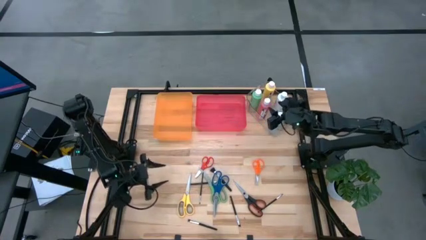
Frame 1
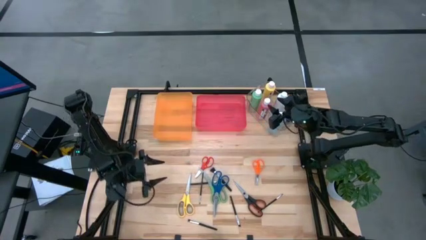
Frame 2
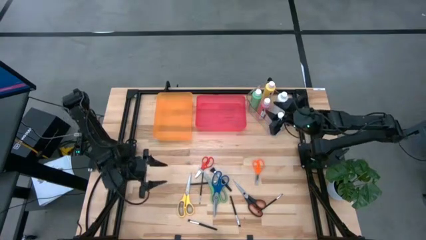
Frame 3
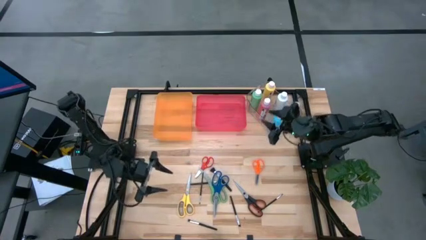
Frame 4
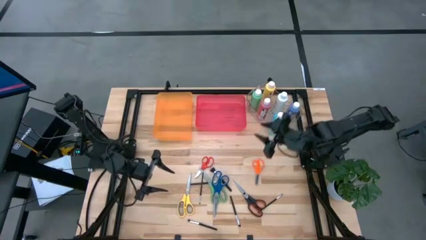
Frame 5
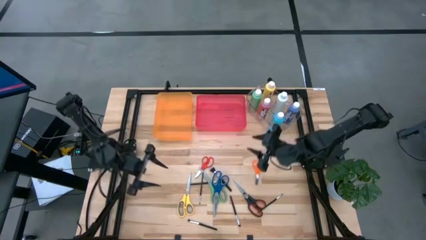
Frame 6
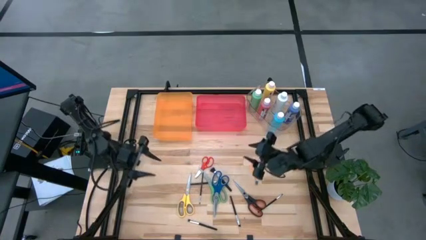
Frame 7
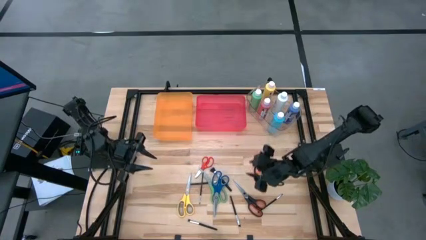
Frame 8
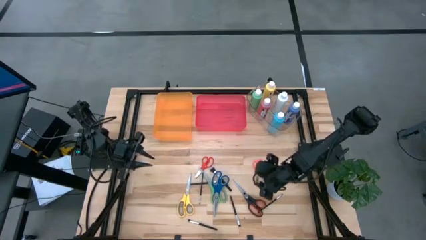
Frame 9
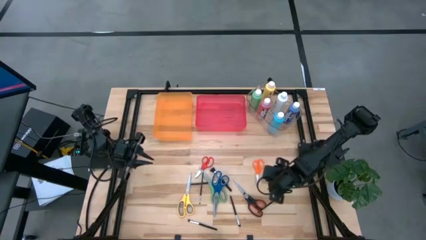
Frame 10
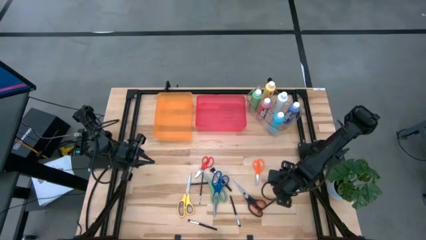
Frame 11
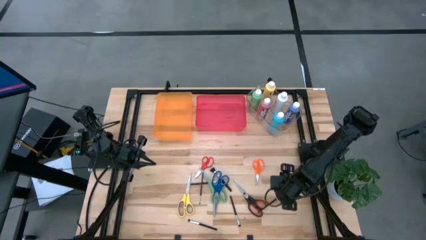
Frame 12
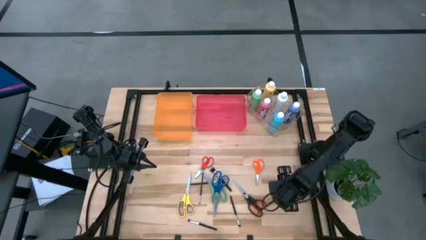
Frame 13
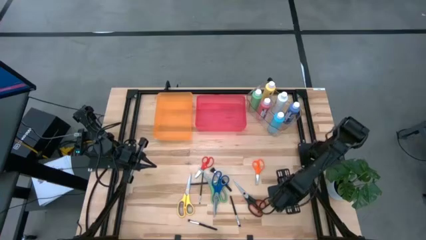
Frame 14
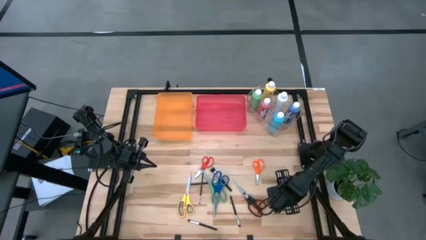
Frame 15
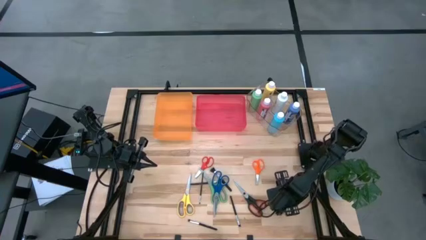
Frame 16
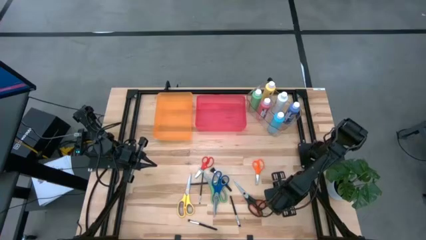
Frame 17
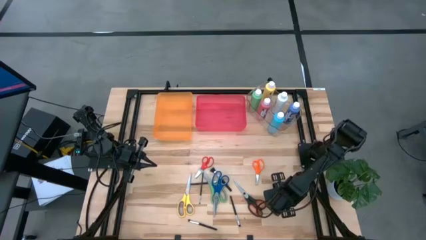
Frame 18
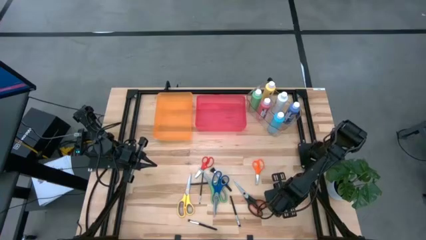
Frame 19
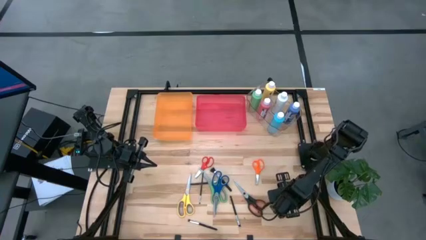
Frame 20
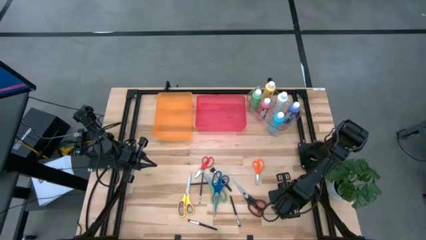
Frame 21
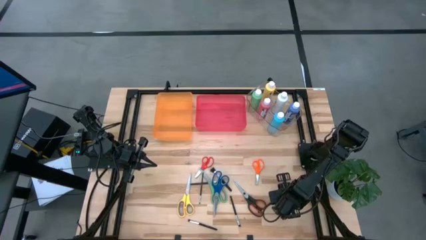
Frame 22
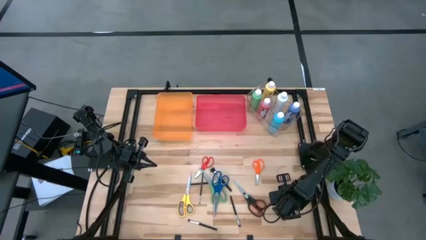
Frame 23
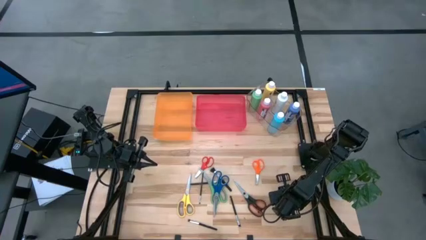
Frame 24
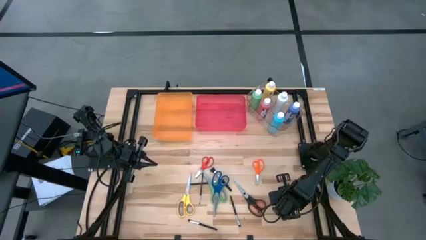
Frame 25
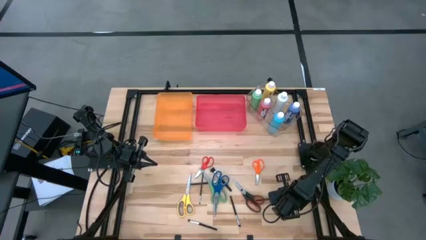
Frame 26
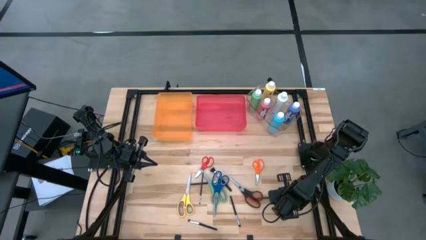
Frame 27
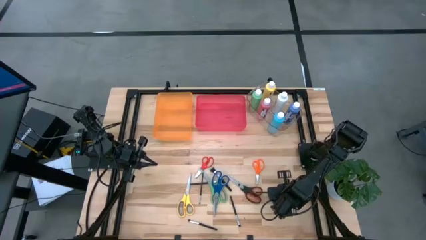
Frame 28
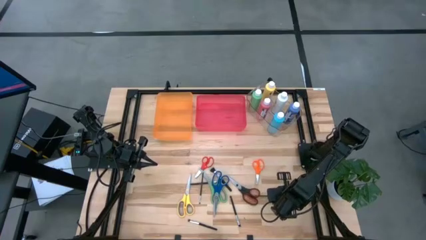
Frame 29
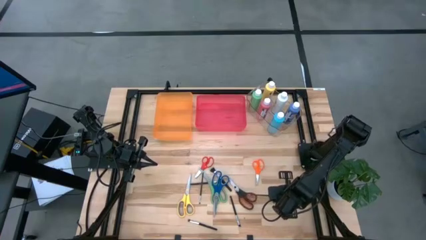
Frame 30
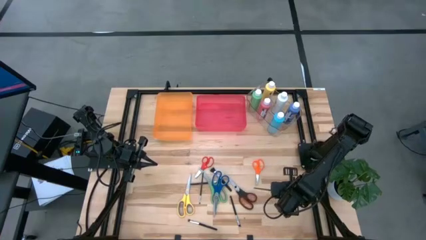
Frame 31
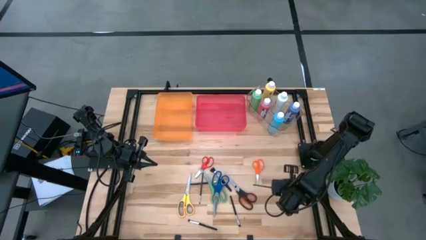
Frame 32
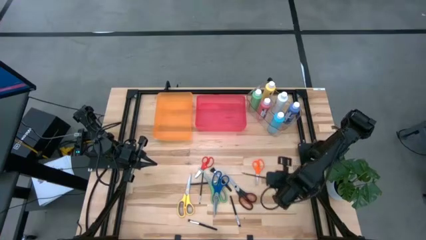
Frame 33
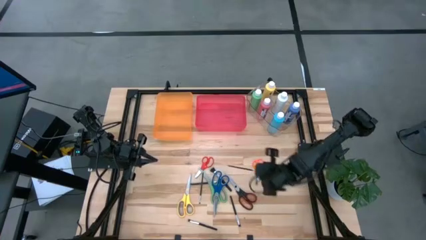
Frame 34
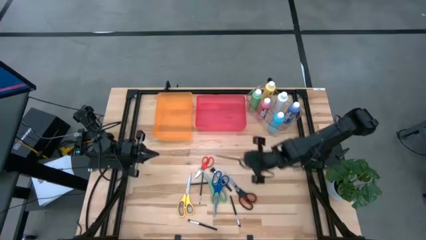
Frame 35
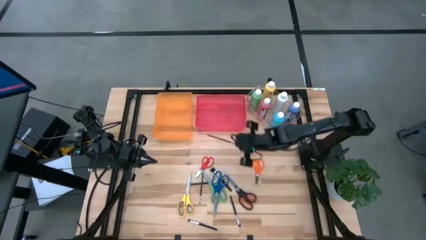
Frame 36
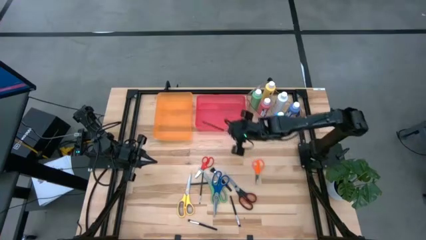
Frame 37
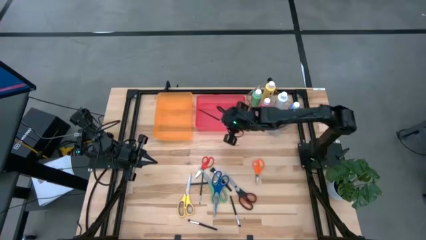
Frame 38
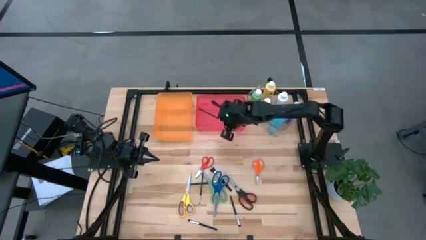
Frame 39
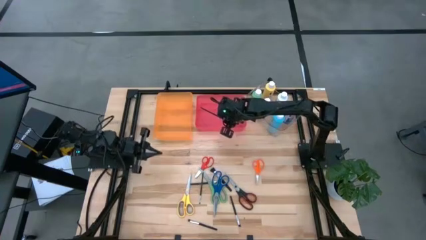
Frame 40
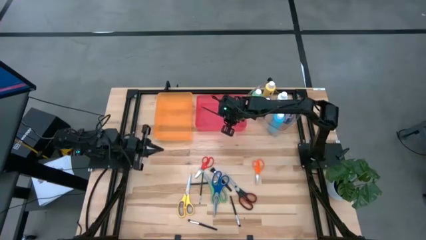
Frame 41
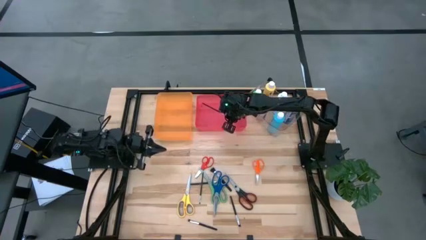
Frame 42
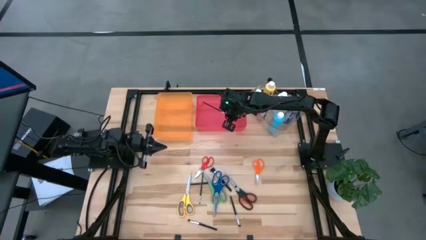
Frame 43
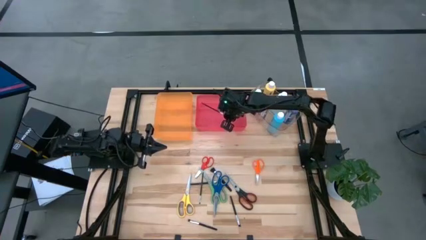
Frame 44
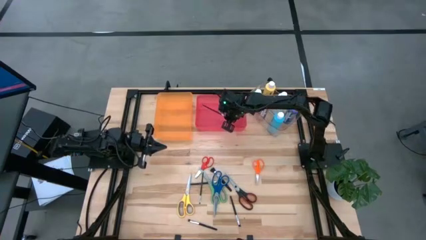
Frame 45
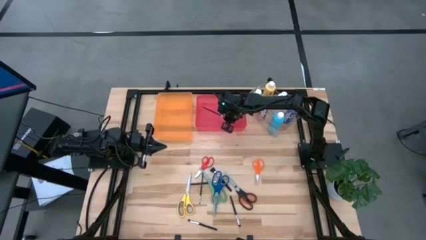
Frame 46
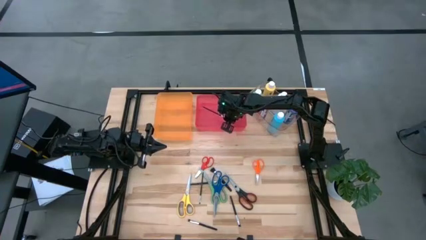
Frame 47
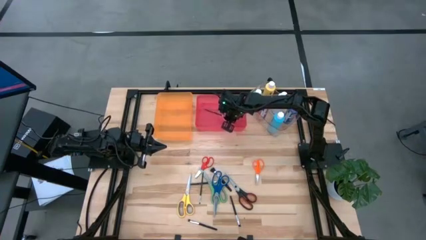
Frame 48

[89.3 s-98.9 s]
Task: Pick & Place Paint Supplies
Put the black paintbrush into the pink bin

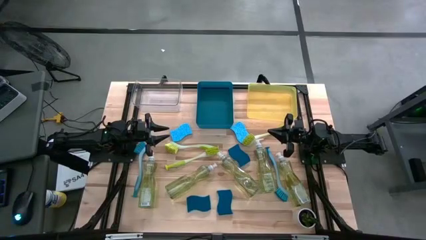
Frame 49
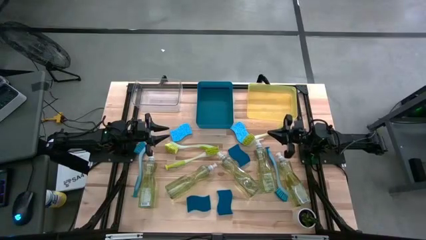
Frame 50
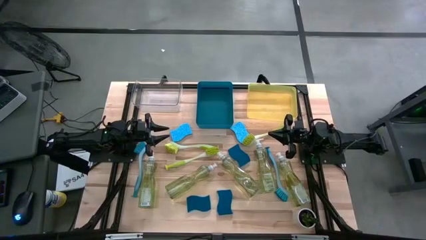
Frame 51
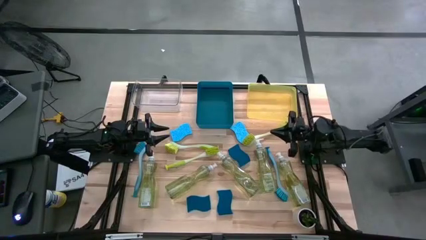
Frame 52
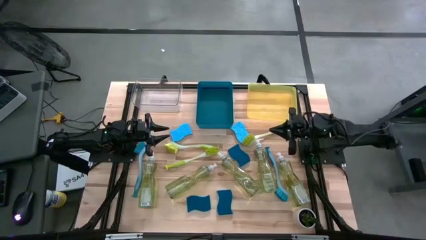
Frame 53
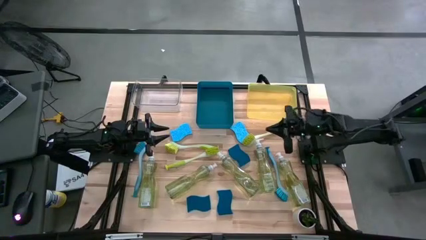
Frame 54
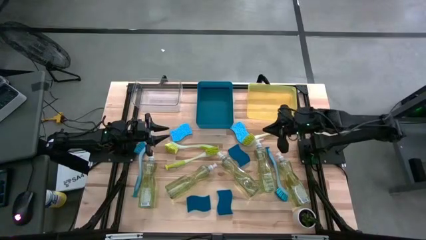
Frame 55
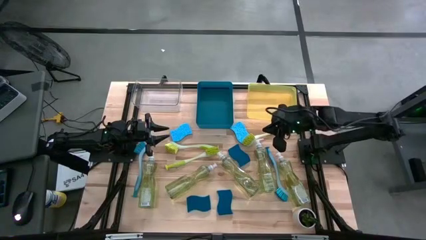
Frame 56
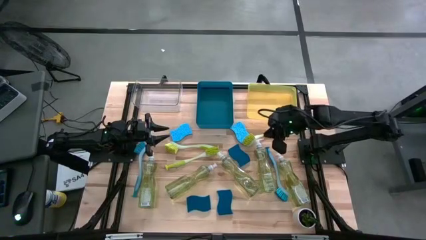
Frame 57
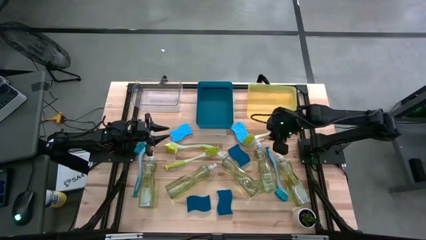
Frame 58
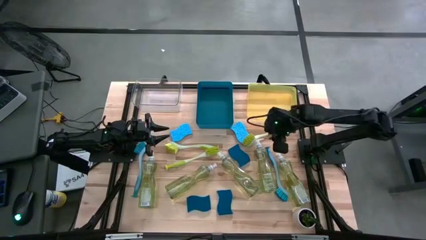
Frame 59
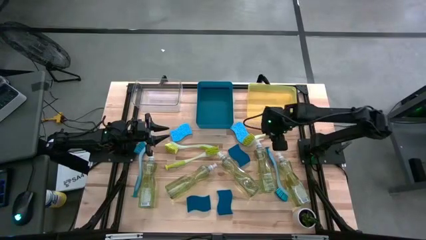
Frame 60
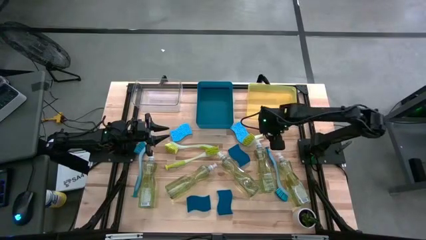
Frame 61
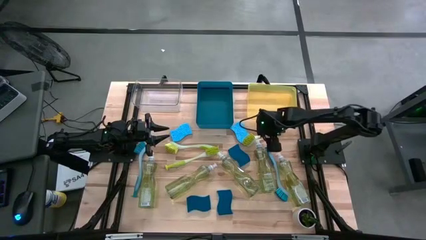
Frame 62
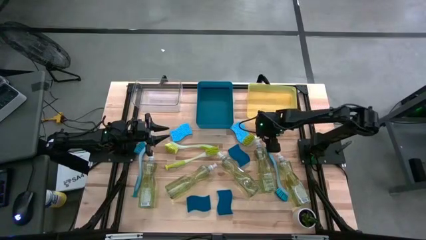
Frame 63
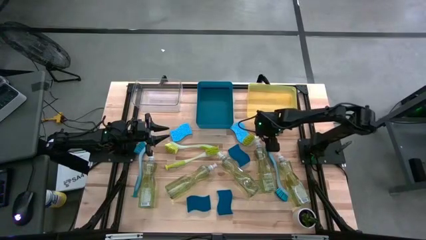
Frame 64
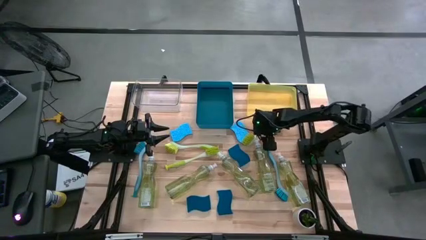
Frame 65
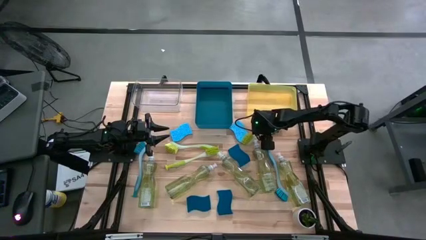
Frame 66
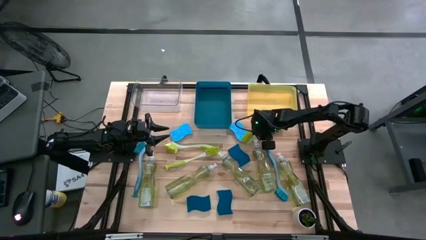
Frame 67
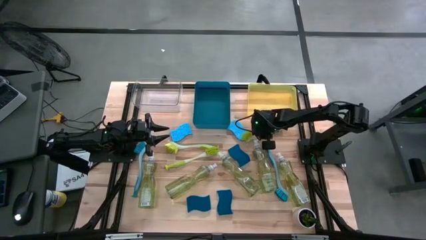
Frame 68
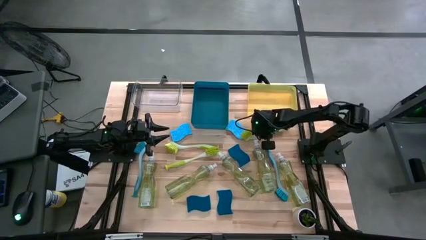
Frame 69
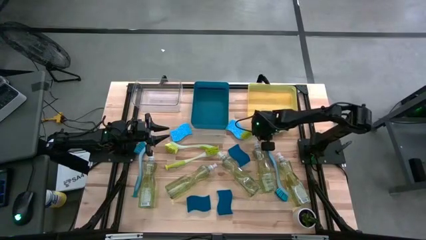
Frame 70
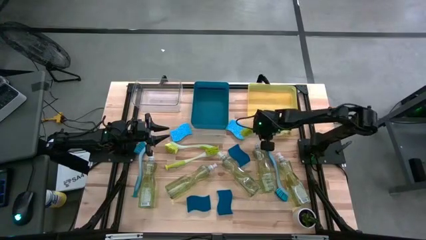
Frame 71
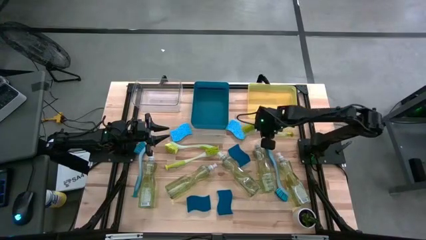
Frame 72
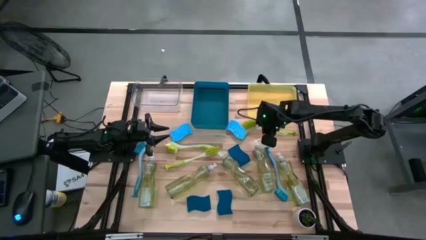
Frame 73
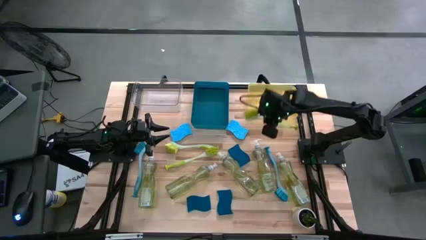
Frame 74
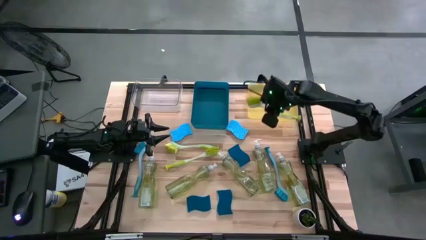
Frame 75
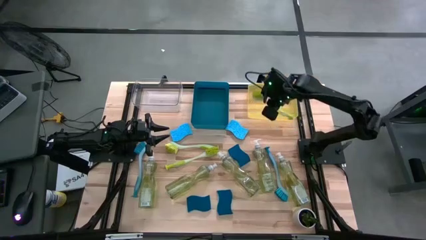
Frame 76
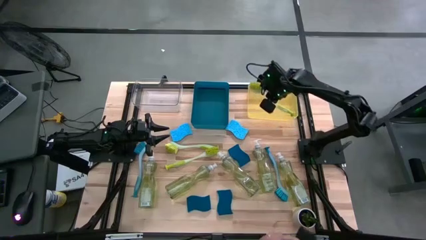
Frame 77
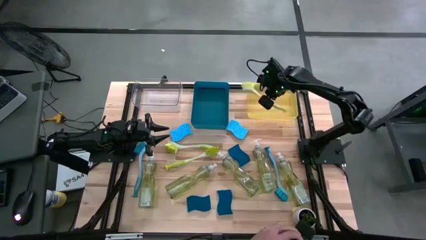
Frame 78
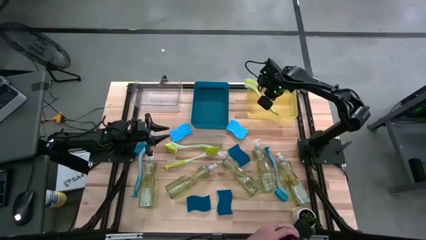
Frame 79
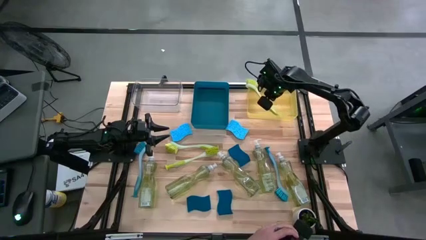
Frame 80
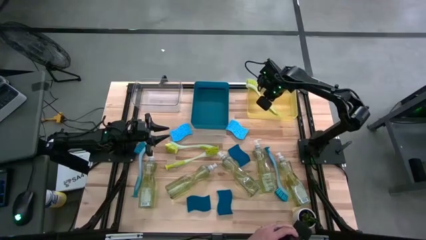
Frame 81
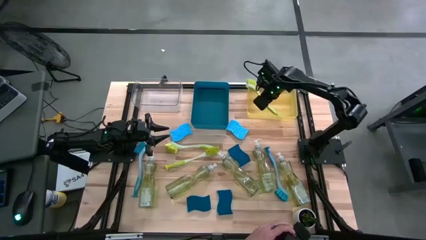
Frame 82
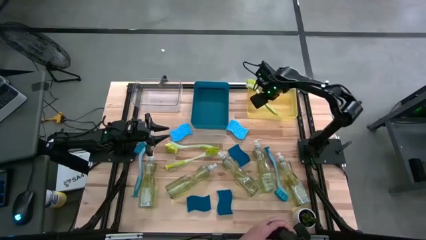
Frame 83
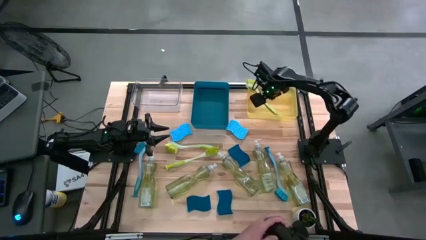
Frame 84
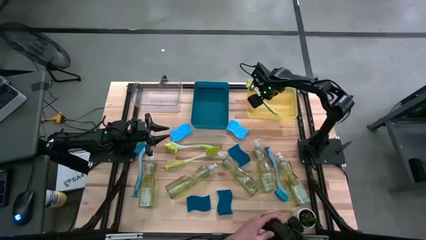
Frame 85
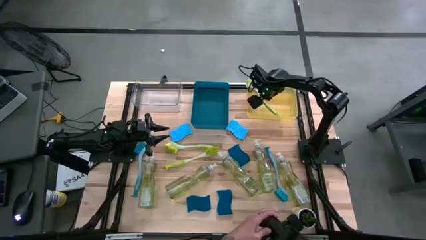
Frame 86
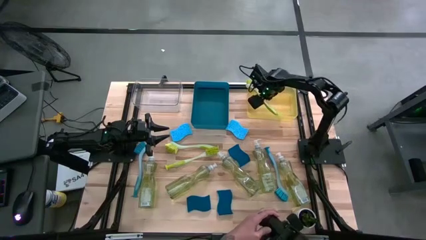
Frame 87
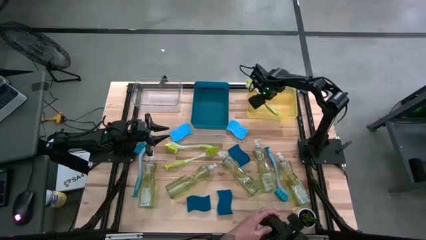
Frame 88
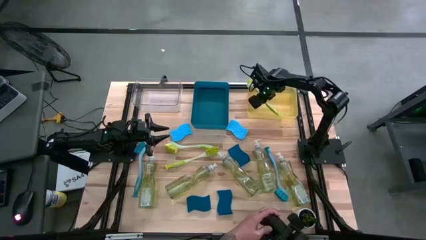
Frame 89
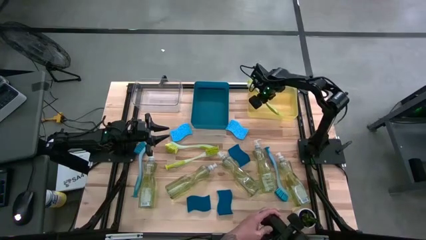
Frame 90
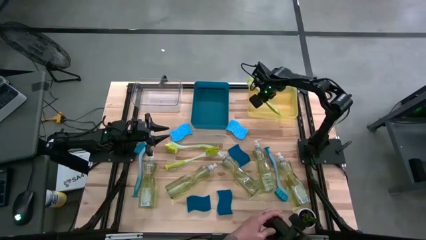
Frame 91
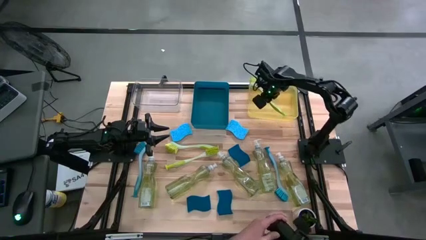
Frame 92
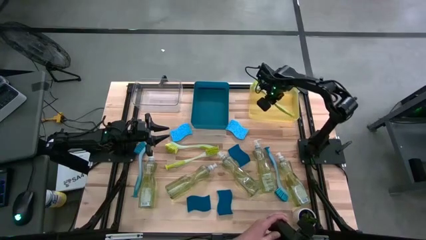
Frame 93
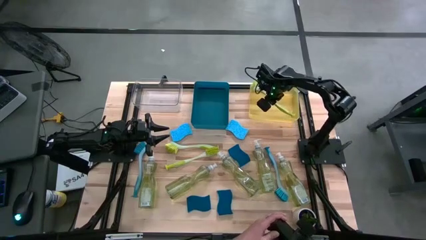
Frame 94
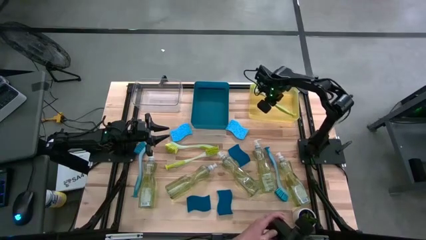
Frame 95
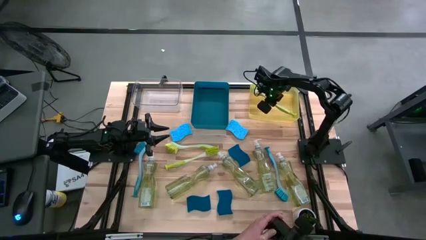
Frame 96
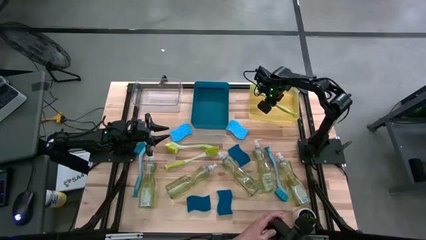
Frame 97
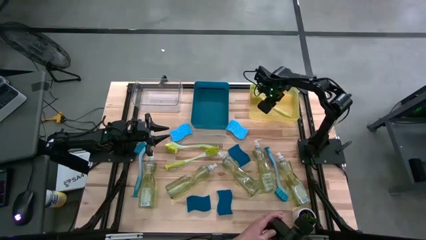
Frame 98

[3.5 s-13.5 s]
Task: Pick & Place Kitchen Sink Supplies
Put the green dish brush into the yellow bin
